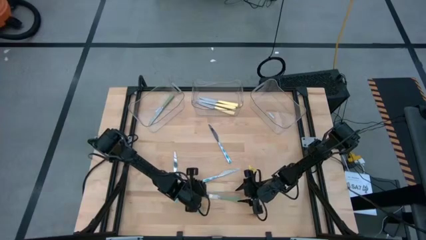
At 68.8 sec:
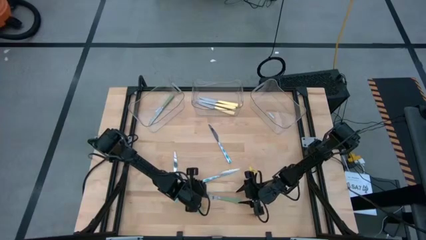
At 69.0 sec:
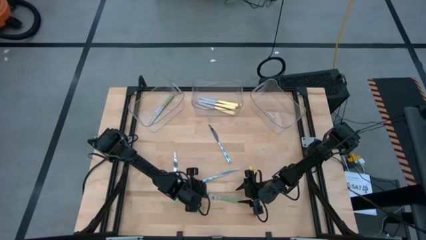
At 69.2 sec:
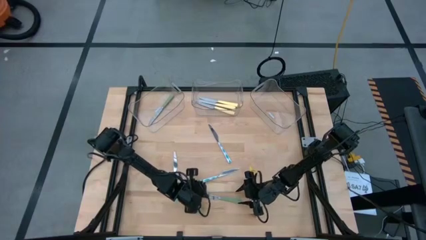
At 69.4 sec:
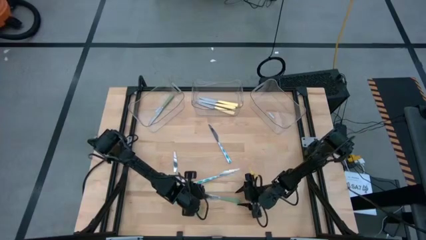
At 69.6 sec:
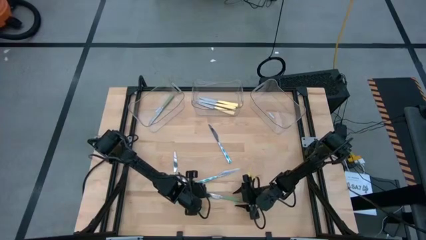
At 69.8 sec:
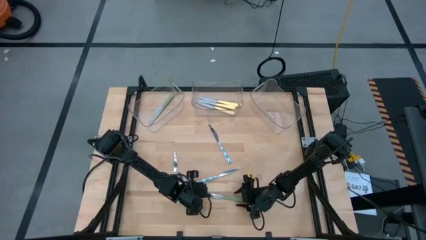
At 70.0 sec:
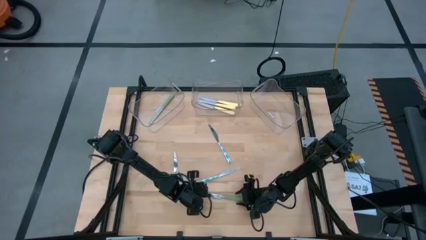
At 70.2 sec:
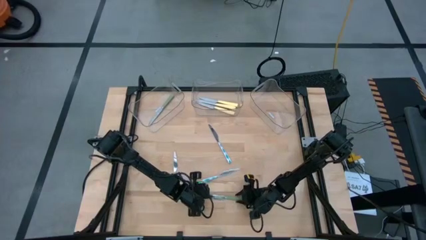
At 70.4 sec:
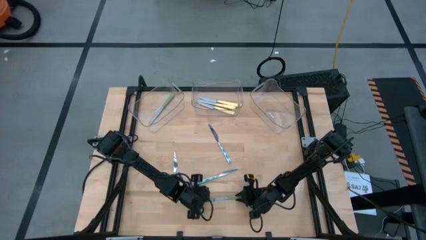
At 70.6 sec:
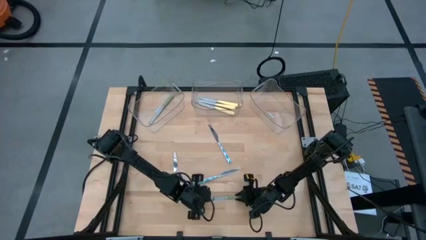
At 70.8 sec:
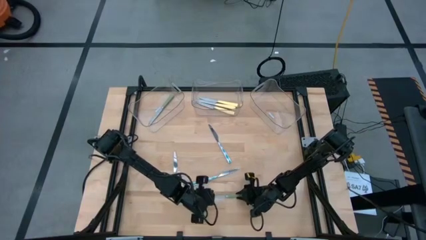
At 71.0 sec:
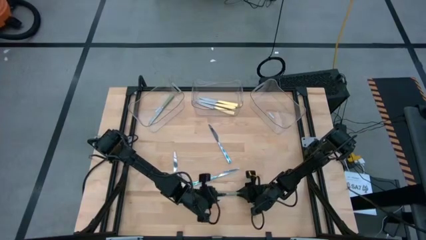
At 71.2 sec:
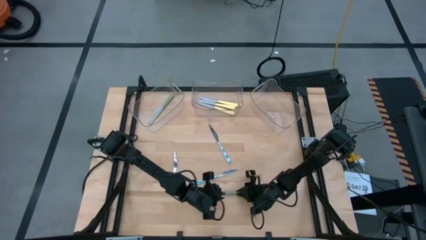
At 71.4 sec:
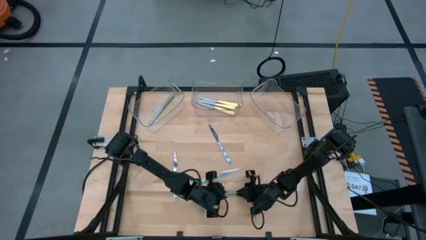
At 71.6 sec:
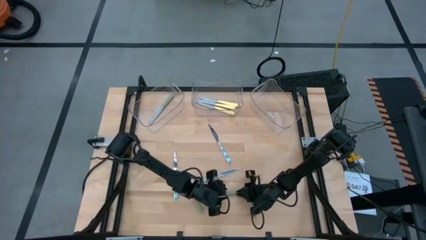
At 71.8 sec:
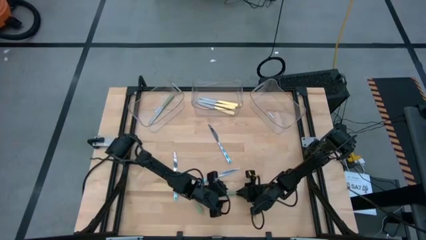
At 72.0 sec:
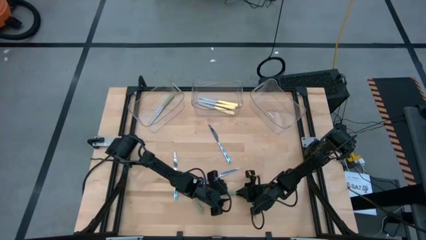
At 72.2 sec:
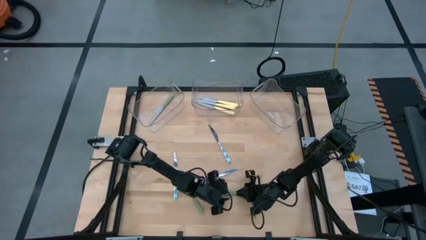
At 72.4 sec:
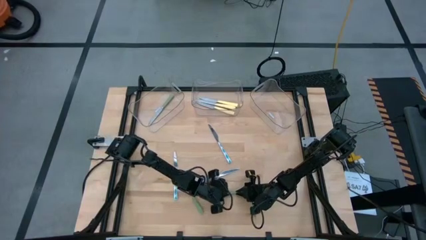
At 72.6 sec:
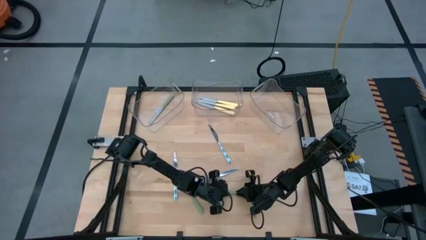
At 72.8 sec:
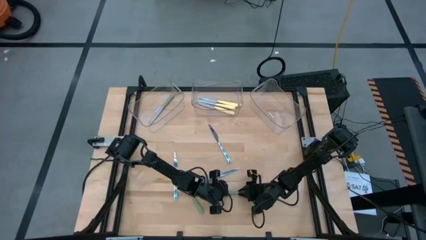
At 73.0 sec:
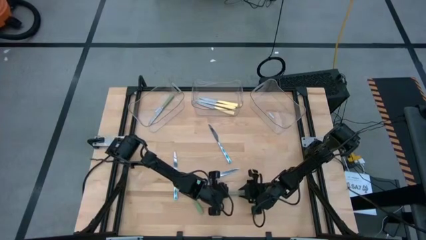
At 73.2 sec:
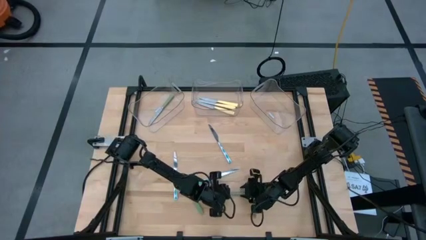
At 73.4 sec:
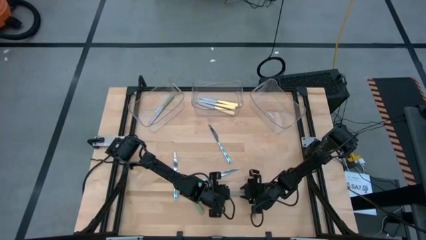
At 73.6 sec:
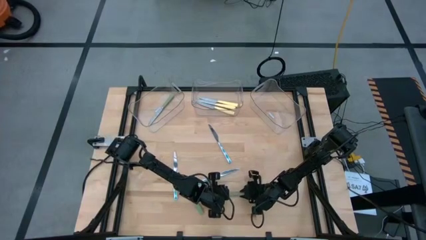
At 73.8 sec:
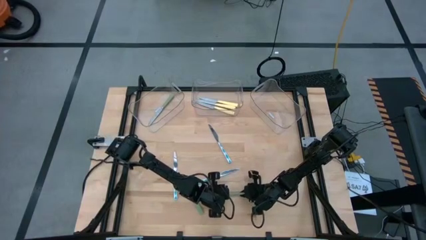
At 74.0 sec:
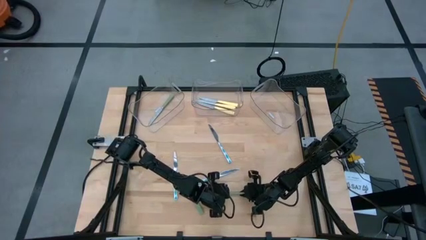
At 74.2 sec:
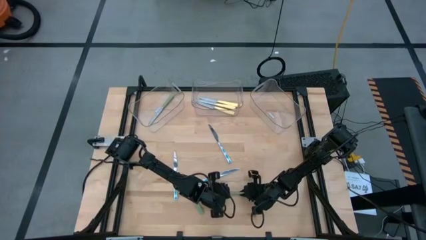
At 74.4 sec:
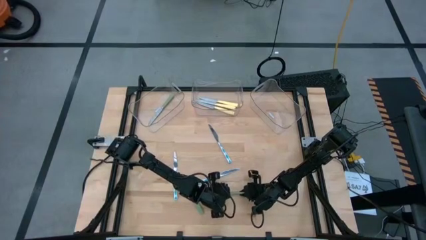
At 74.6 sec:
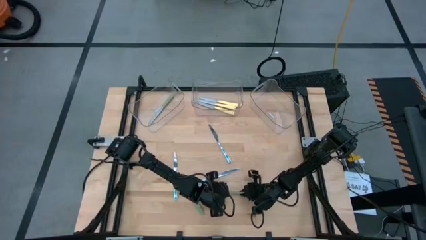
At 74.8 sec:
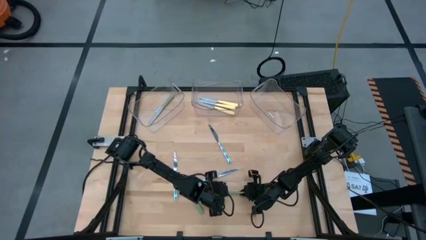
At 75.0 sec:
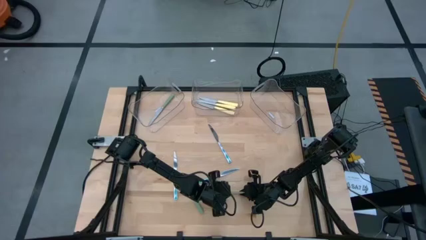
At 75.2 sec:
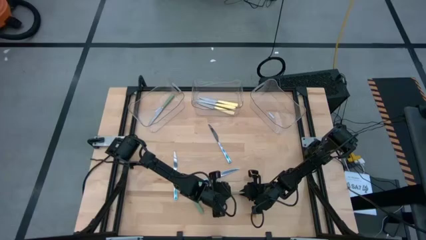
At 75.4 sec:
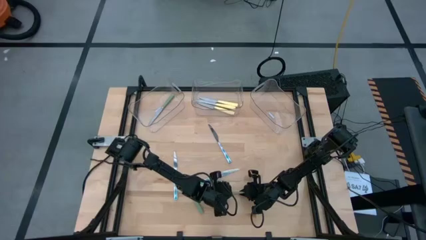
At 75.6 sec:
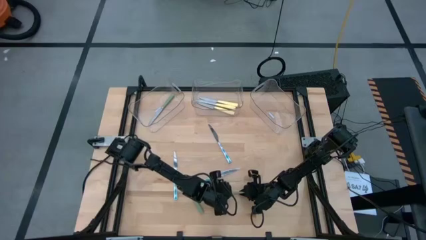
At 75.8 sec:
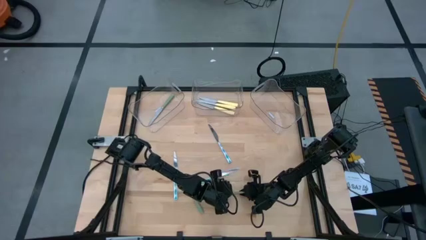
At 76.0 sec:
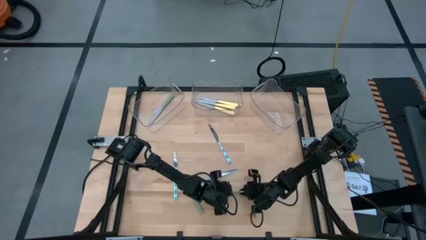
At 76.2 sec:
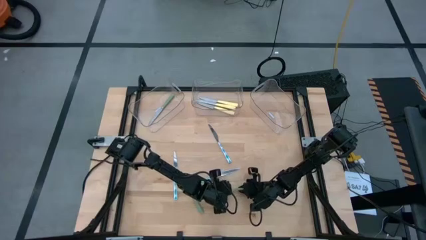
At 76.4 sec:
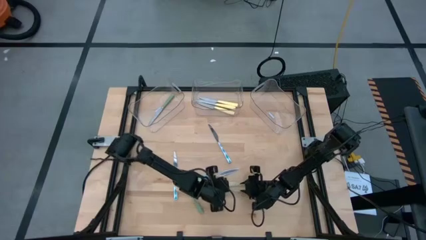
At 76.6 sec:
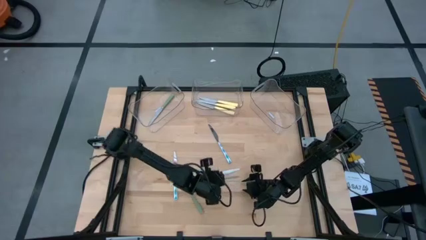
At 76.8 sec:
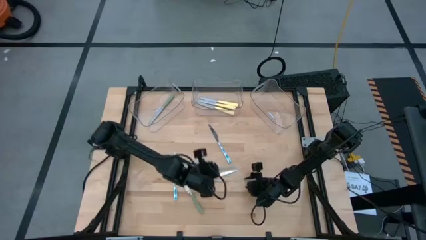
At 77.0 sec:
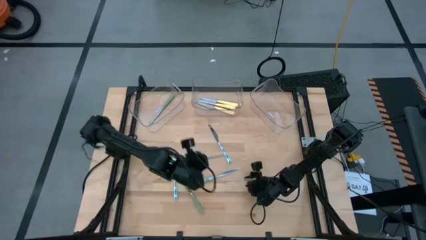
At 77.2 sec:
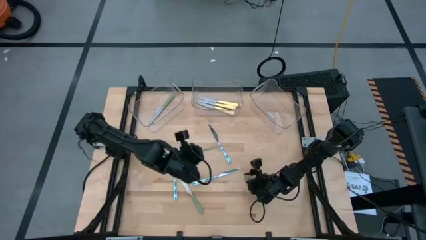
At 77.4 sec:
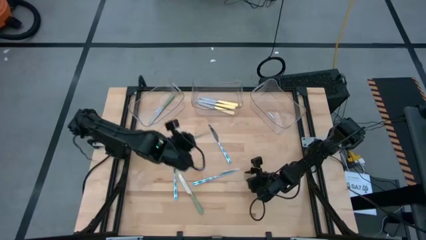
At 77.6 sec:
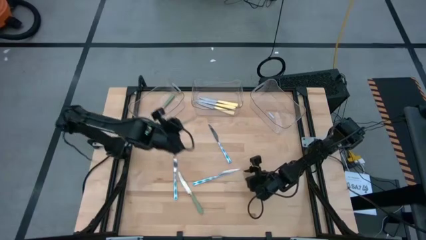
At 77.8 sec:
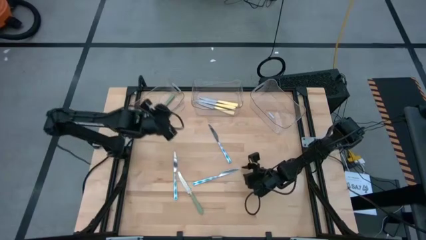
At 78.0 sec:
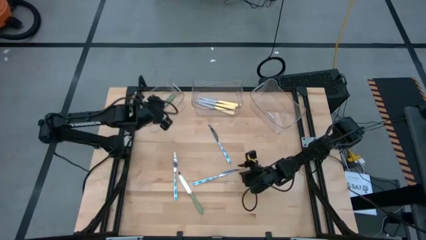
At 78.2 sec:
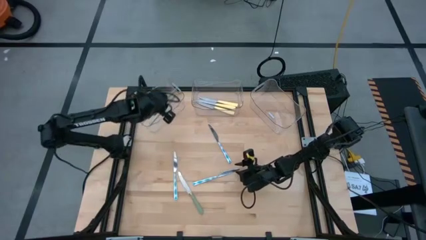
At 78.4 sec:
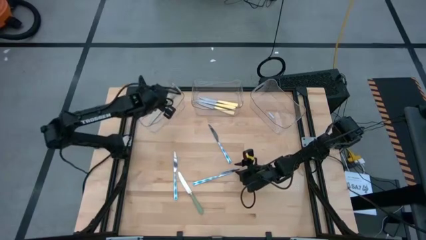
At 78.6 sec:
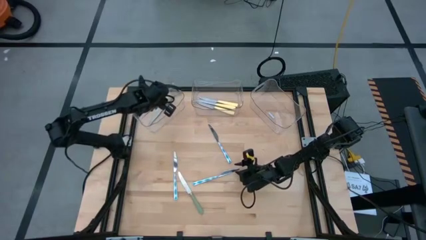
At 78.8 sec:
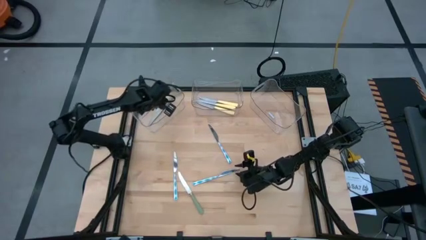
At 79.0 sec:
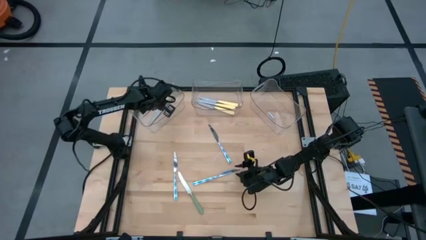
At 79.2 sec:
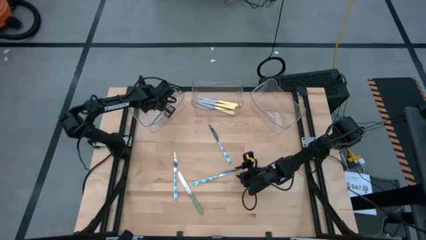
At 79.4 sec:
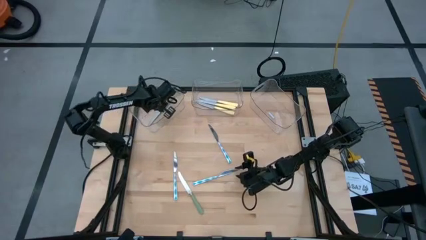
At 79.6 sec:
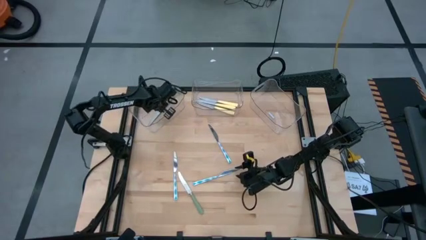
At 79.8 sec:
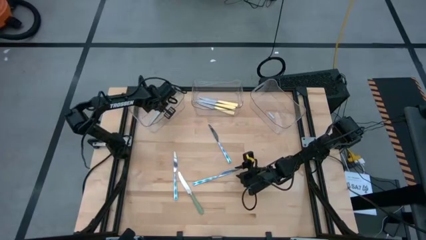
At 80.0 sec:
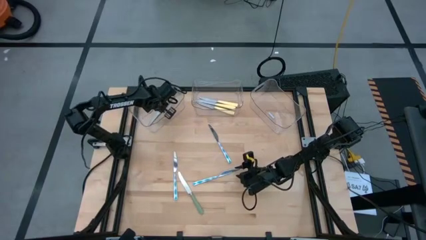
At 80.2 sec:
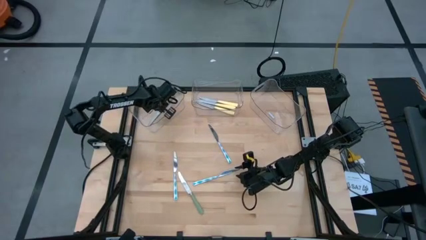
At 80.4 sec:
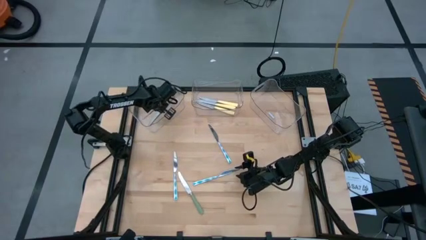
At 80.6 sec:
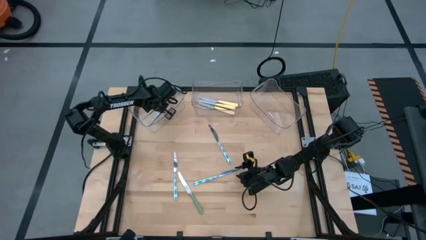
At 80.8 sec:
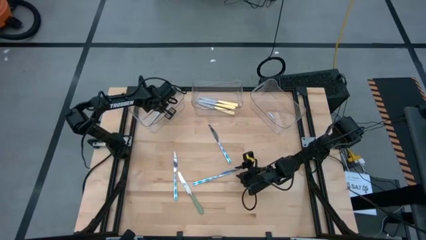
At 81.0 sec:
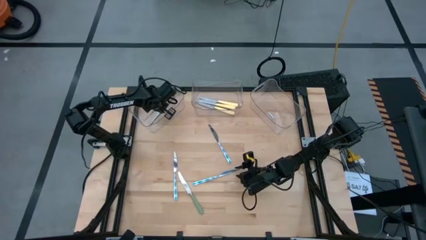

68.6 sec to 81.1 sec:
Task: Sort silverware by color (type)
Put the right green table knife into the left transparent bin
